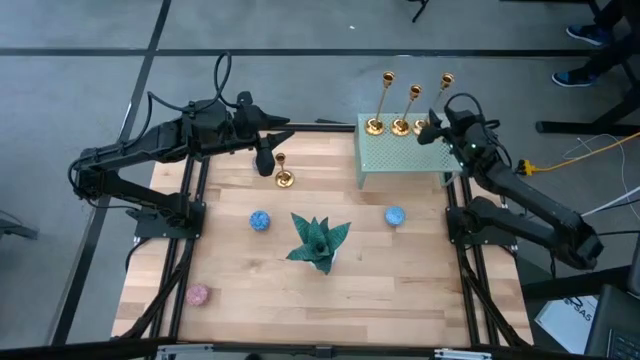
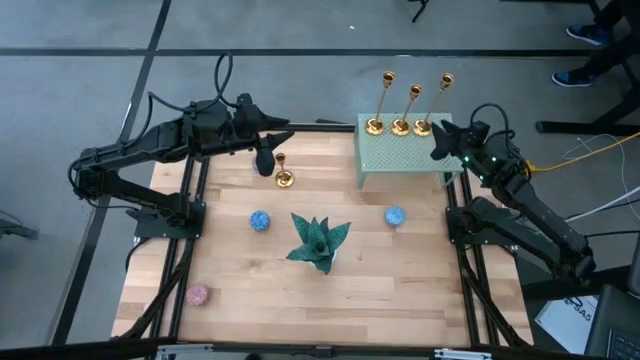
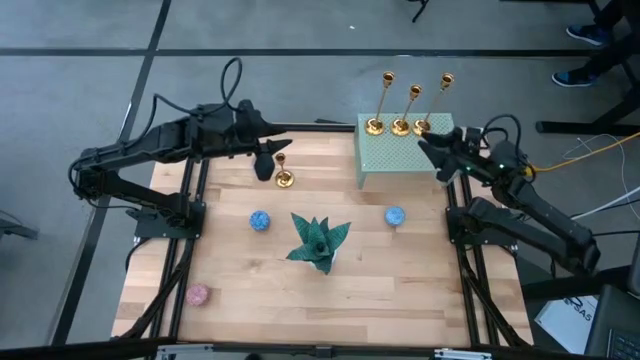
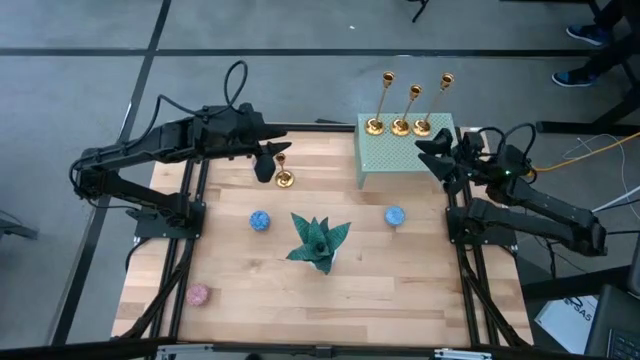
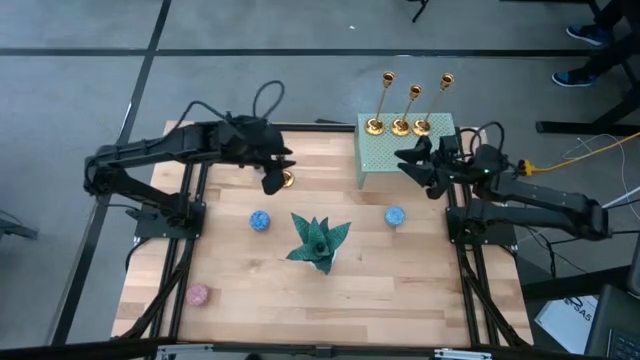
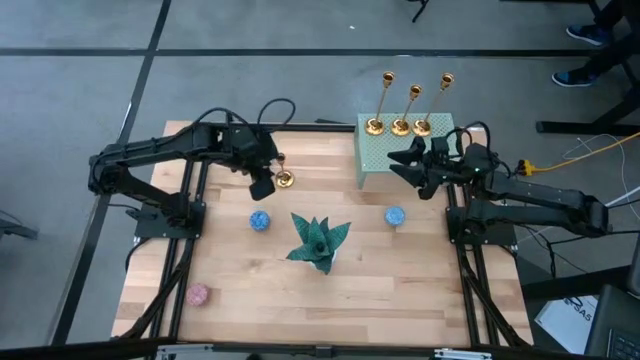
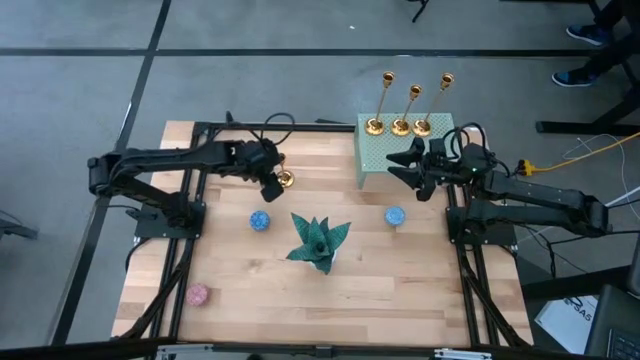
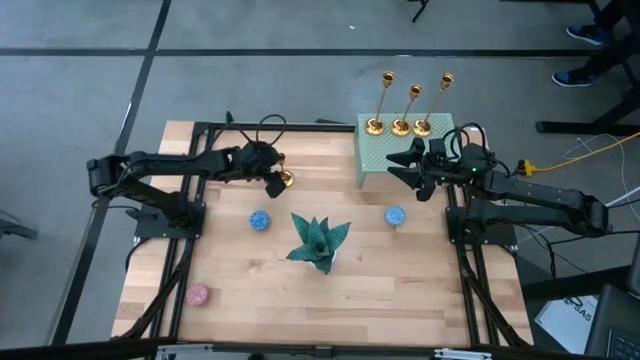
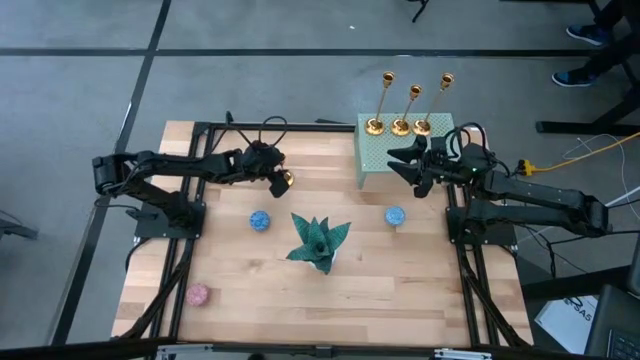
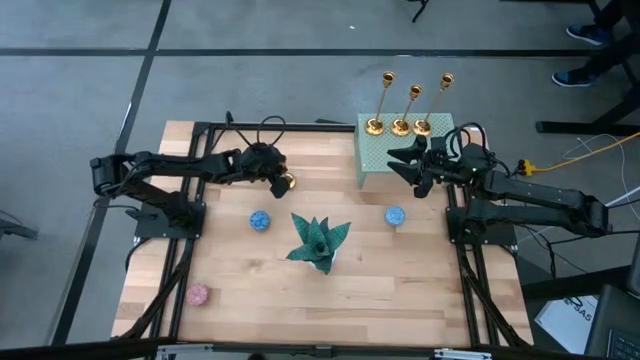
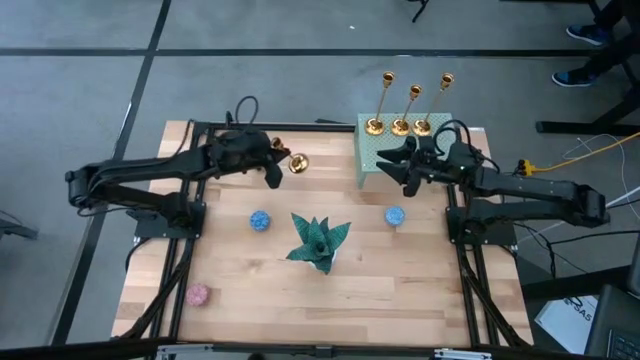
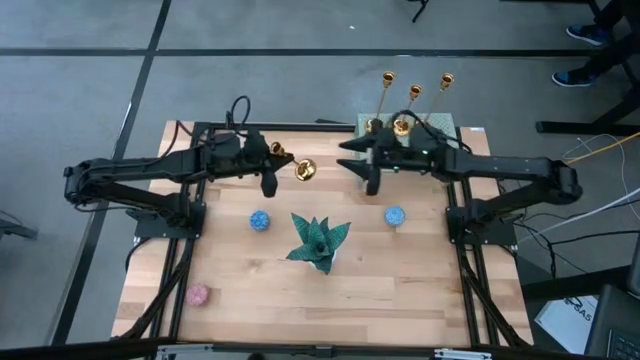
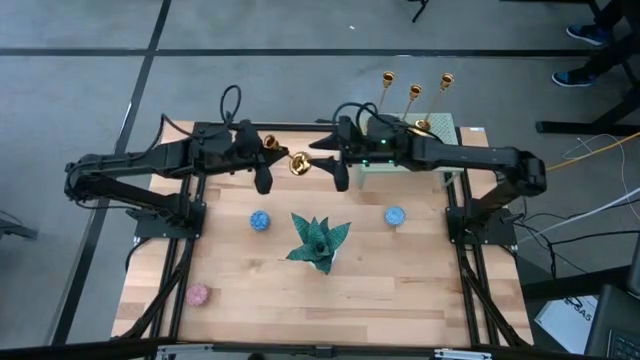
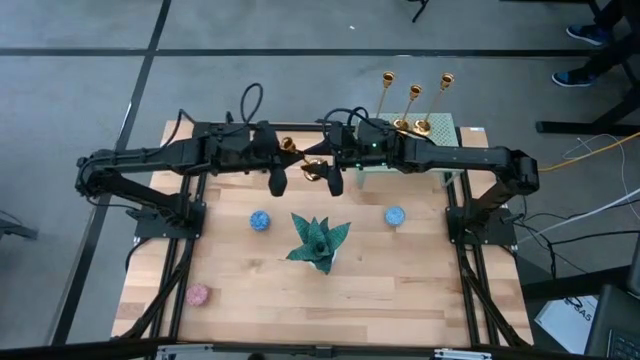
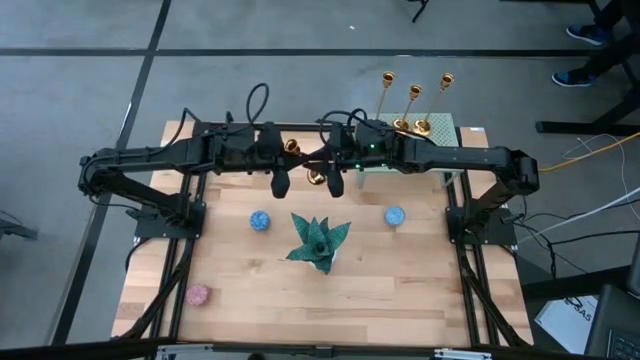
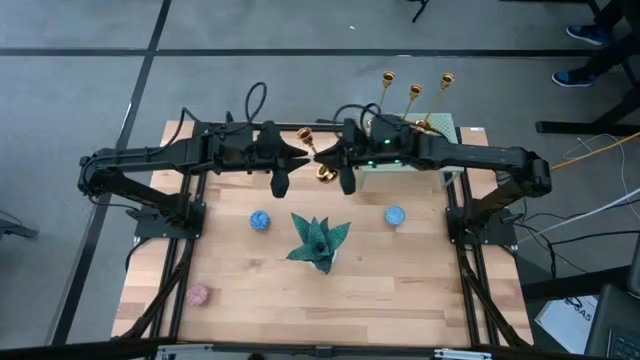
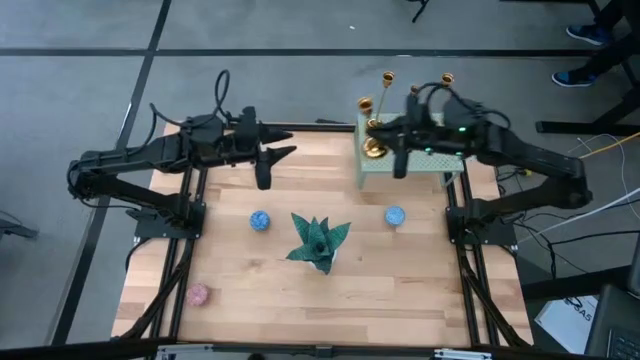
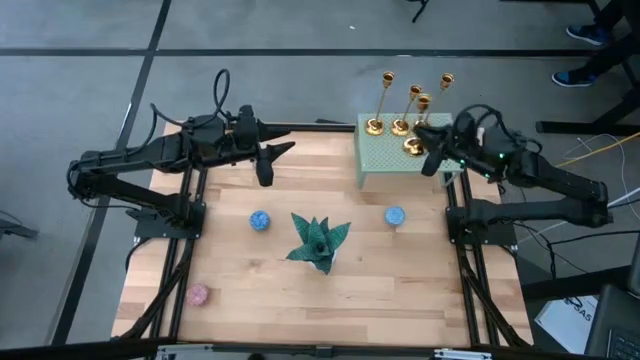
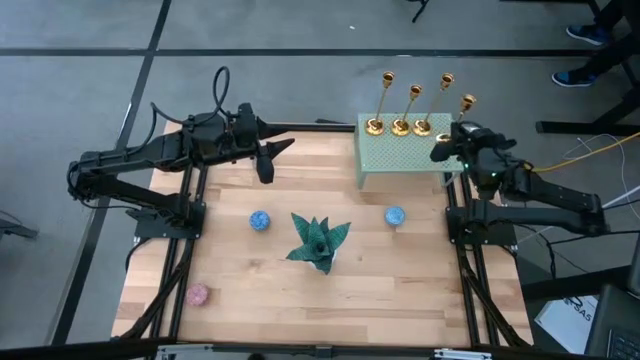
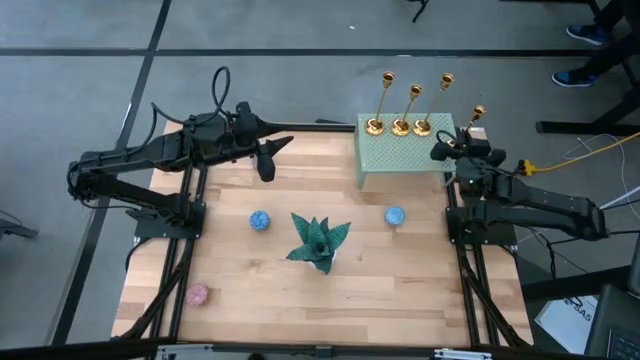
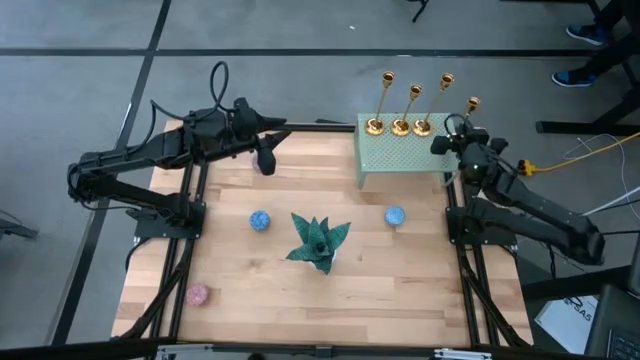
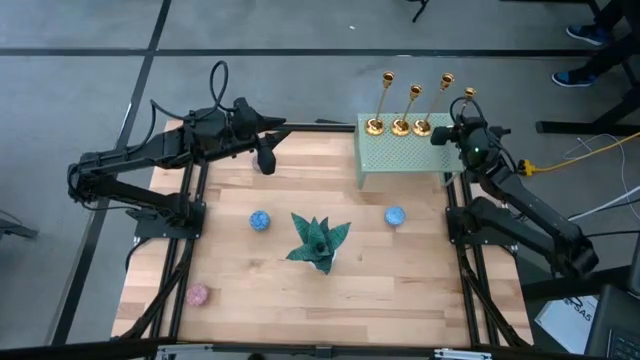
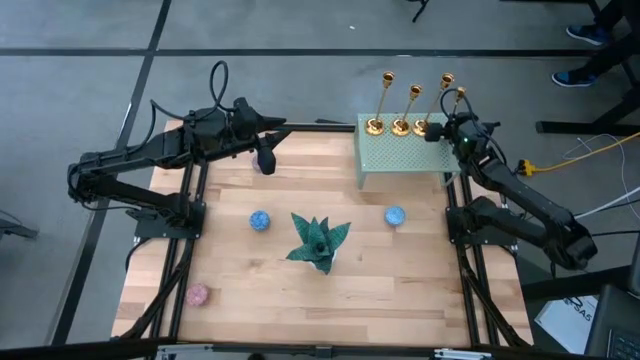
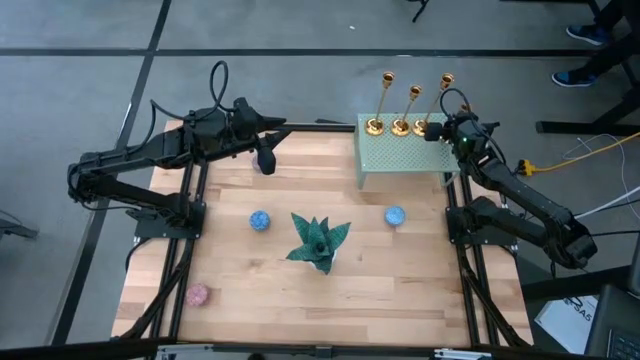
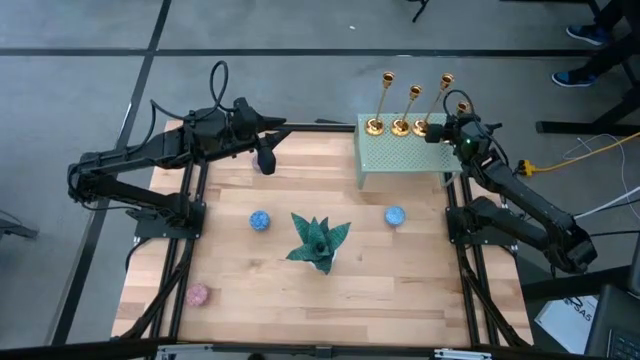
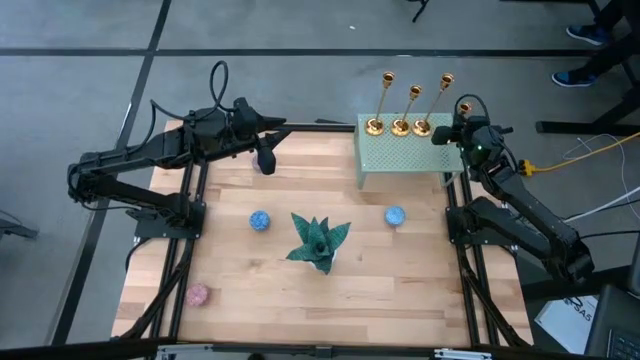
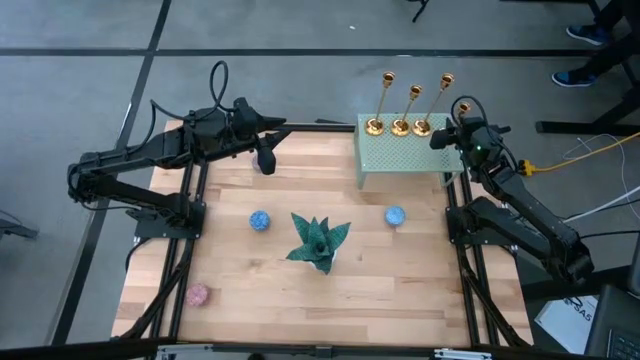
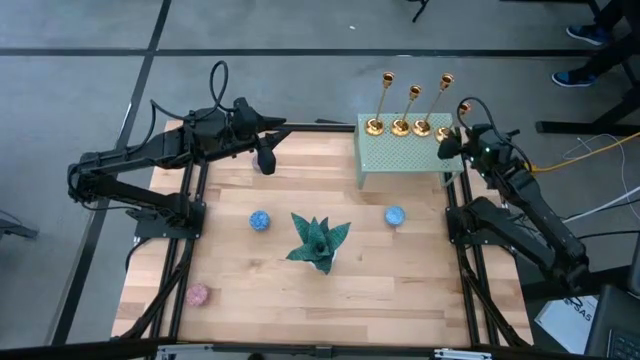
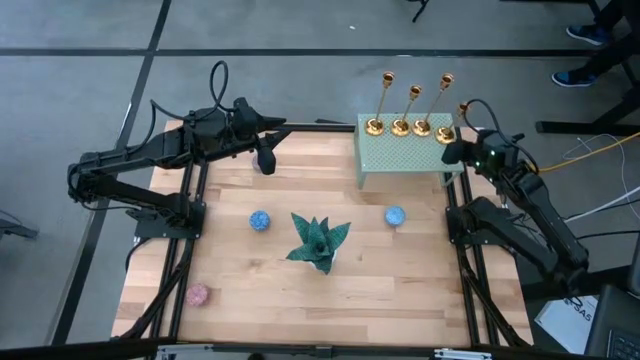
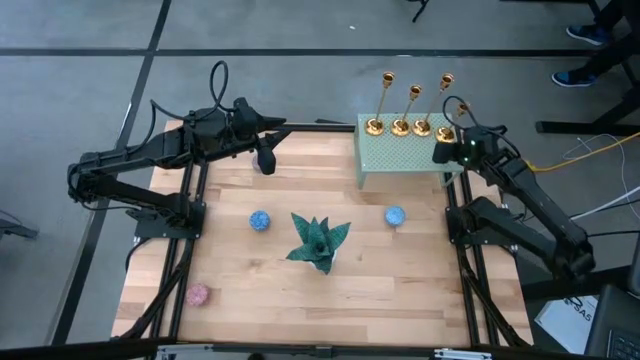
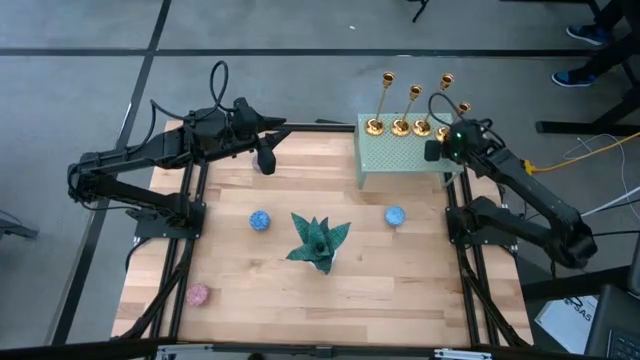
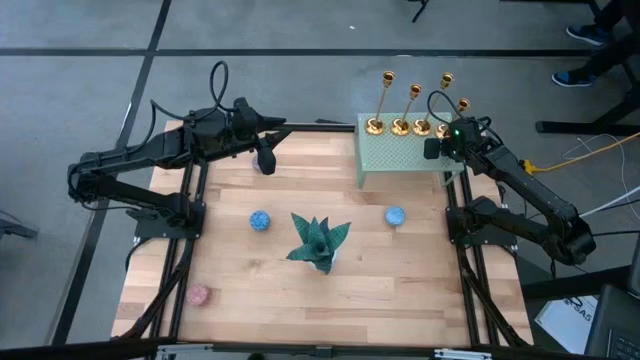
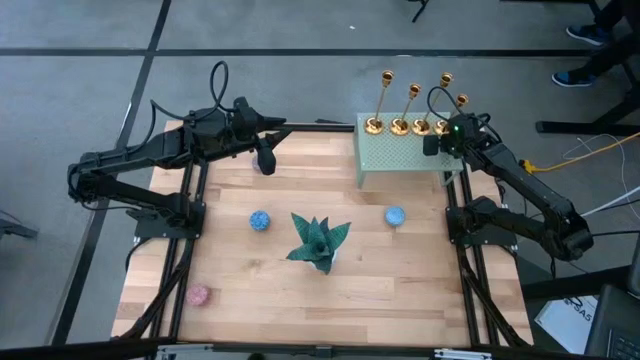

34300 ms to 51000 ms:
Task: Stock candles and holders on shelf
Align the gold candle holder with the other gold candle holders on the shelf

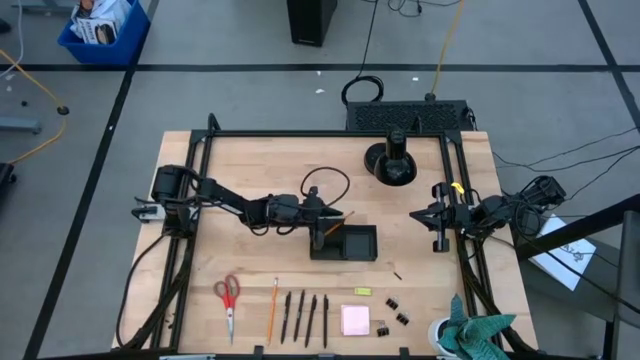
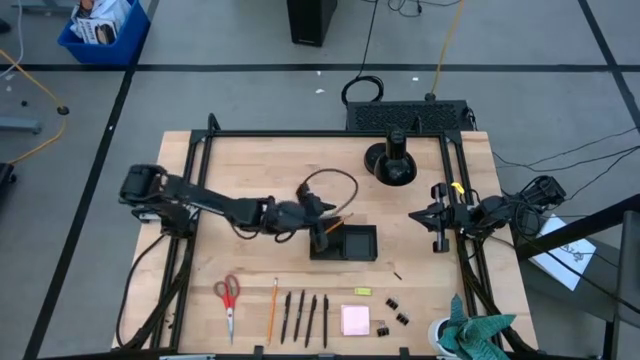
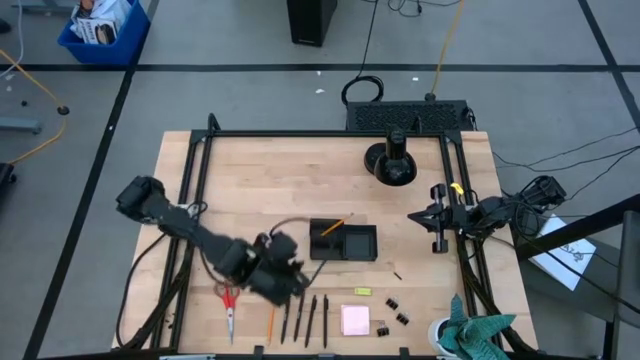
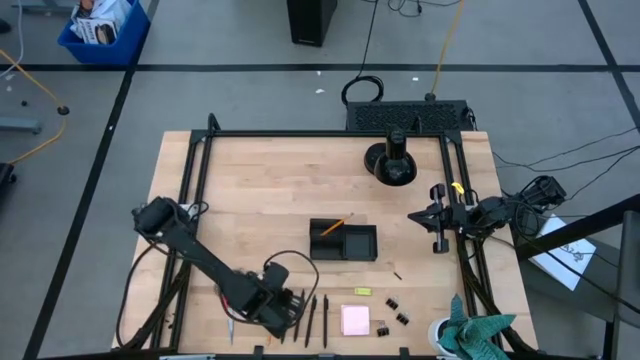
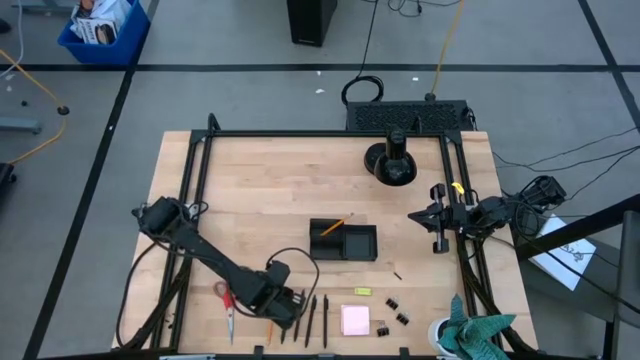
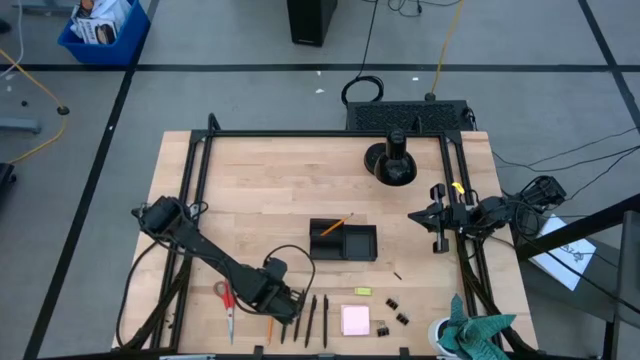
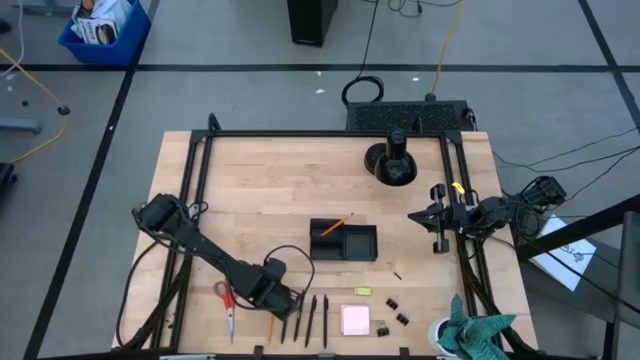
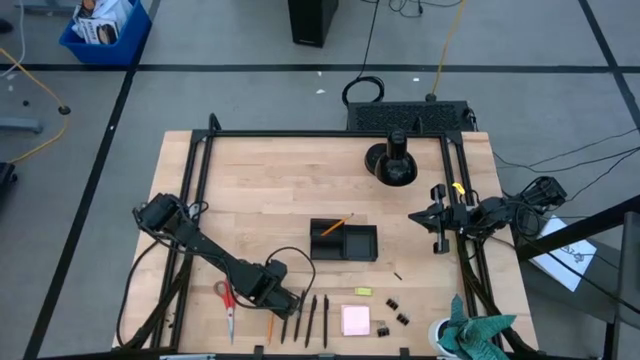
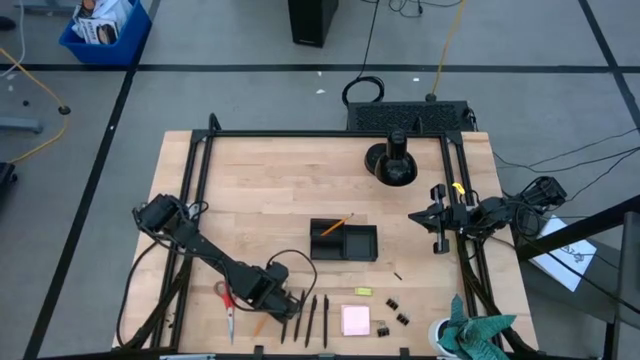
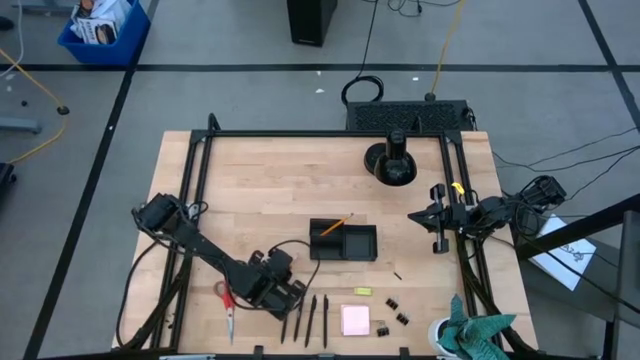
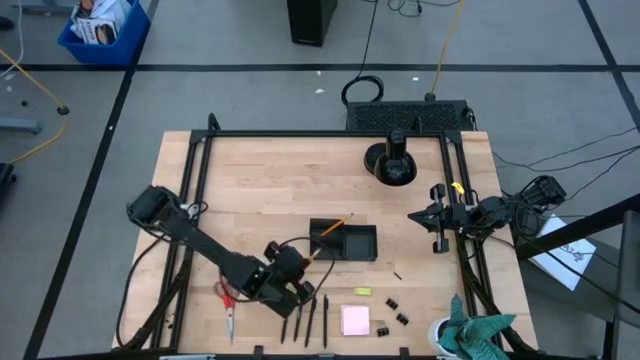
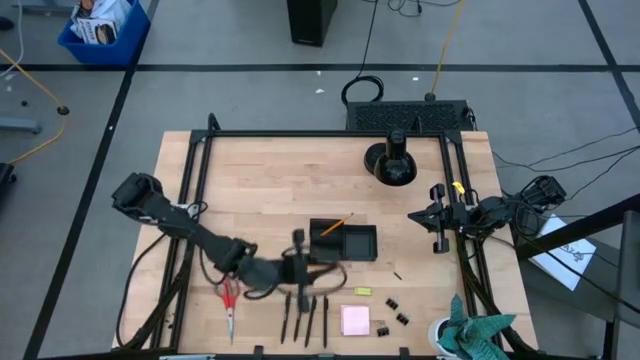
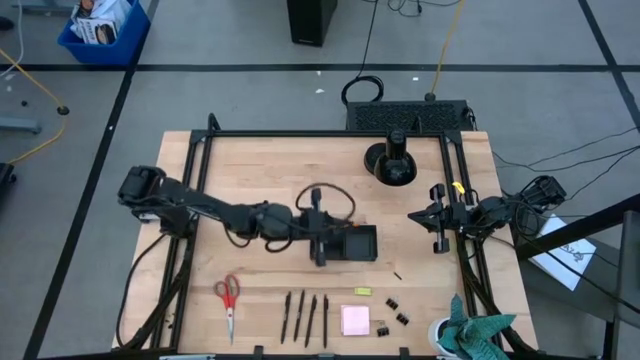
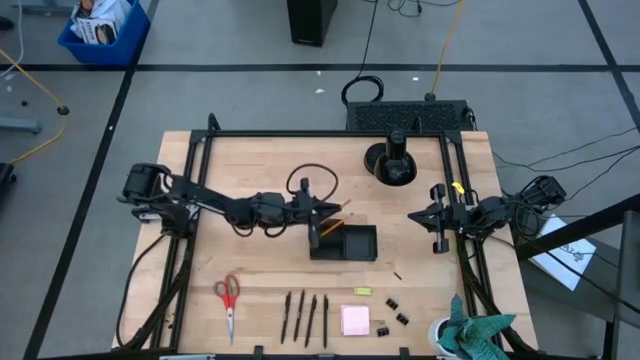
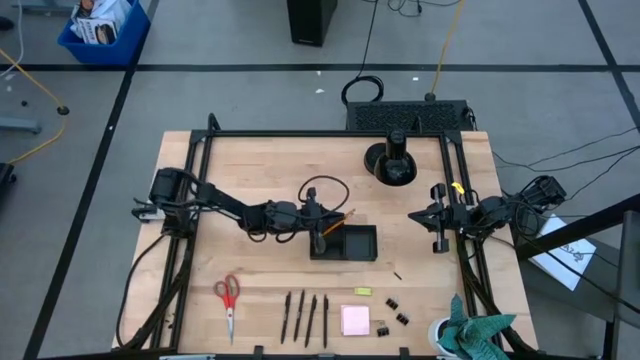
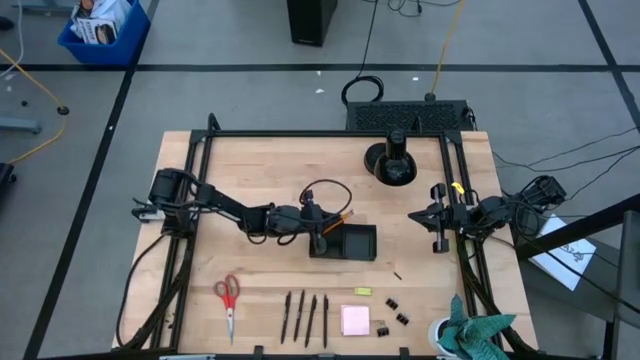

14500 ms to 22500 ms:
Task: Pick and place office supplies into organizer
Put the orange pencil into the black desk organizer
